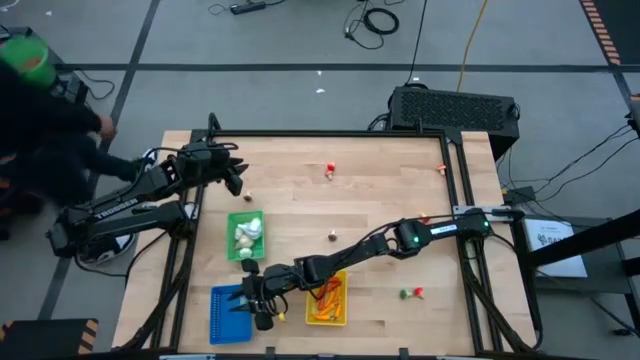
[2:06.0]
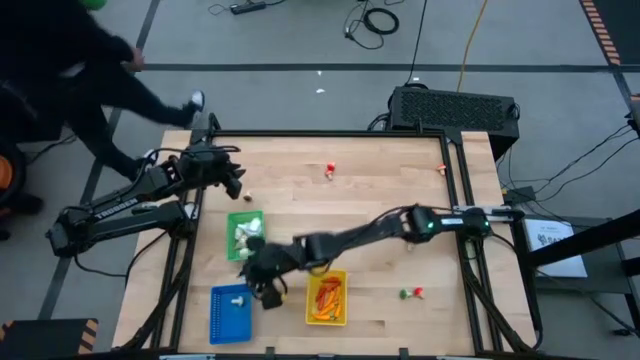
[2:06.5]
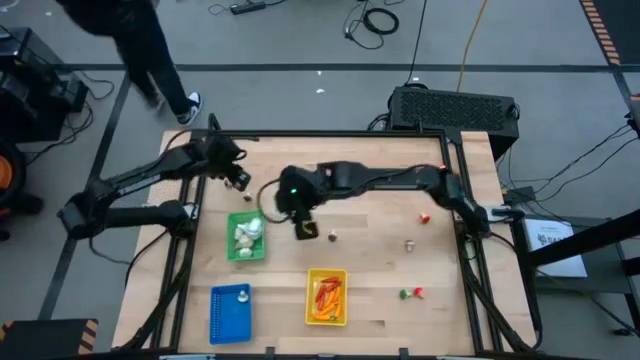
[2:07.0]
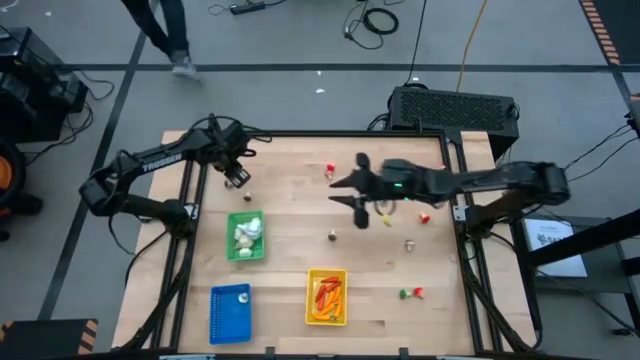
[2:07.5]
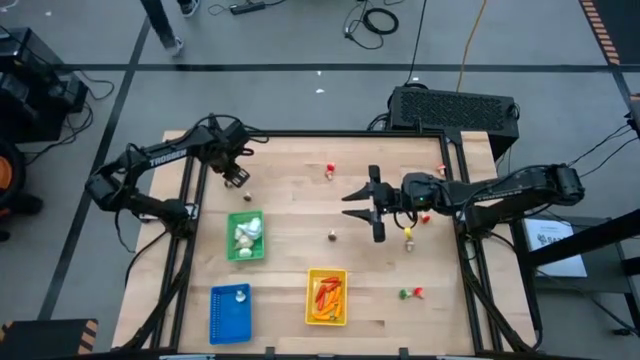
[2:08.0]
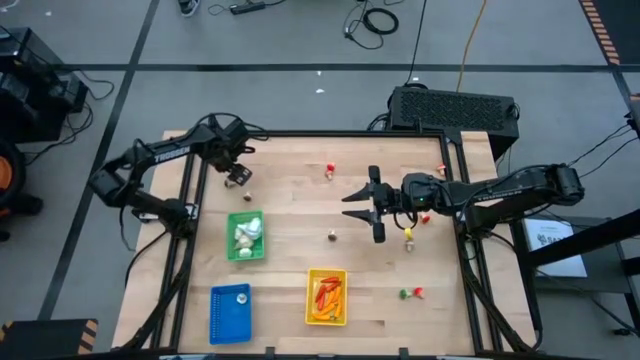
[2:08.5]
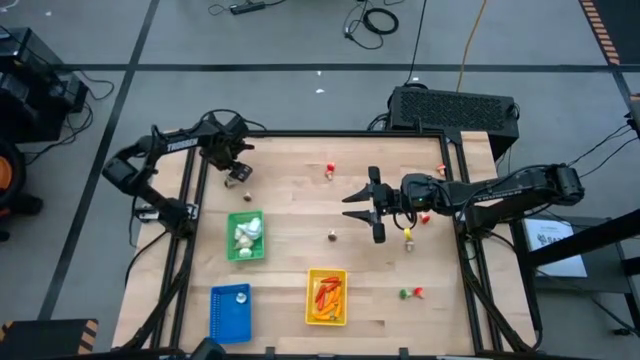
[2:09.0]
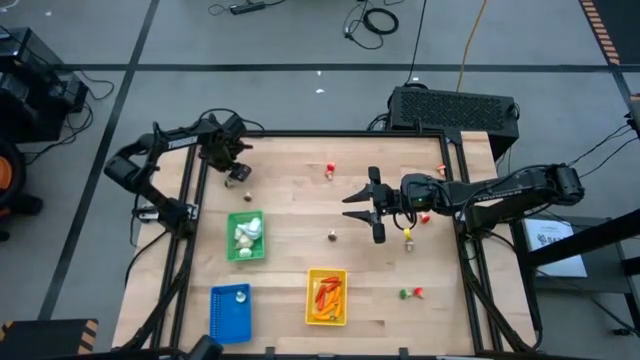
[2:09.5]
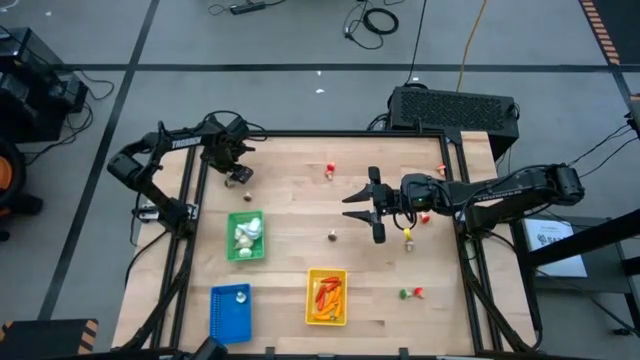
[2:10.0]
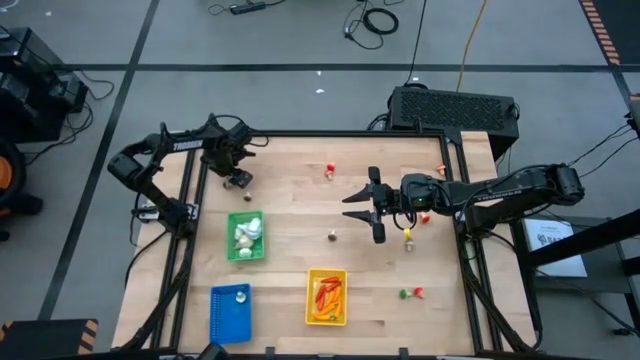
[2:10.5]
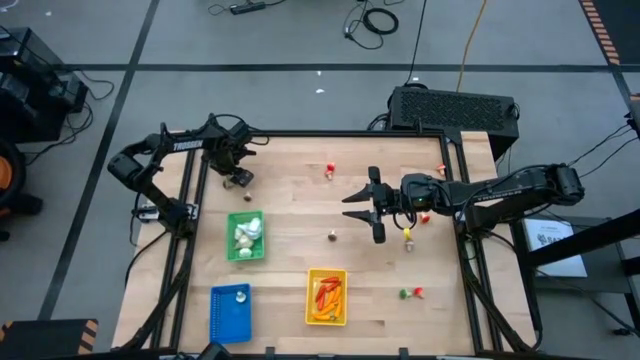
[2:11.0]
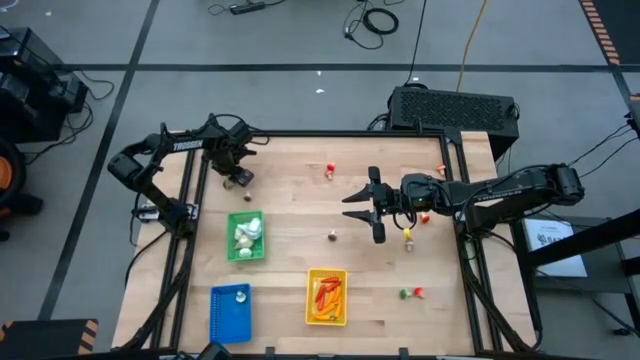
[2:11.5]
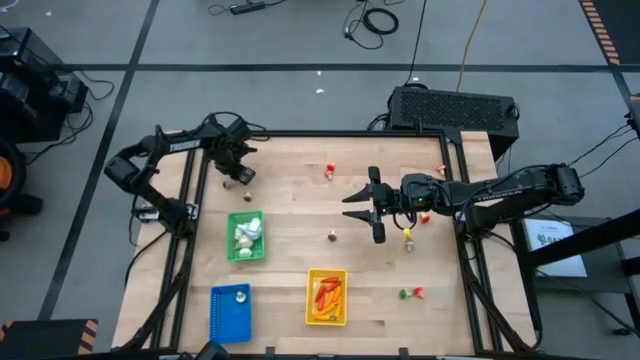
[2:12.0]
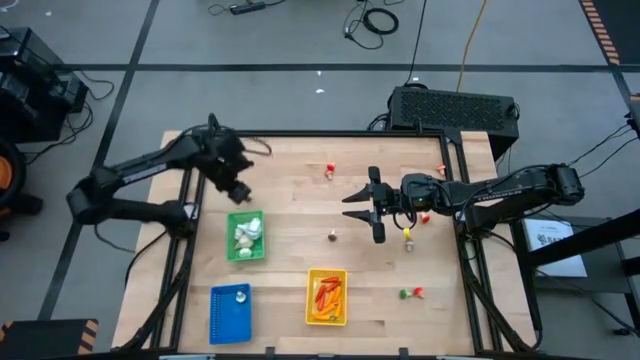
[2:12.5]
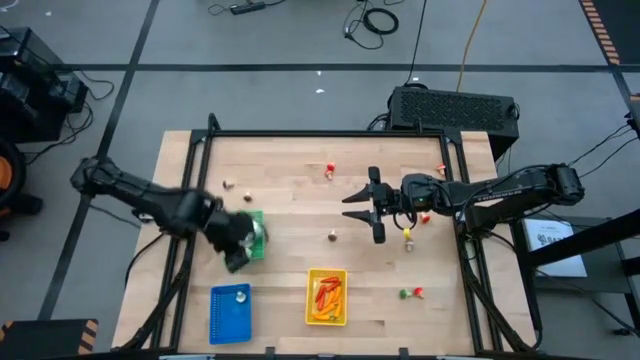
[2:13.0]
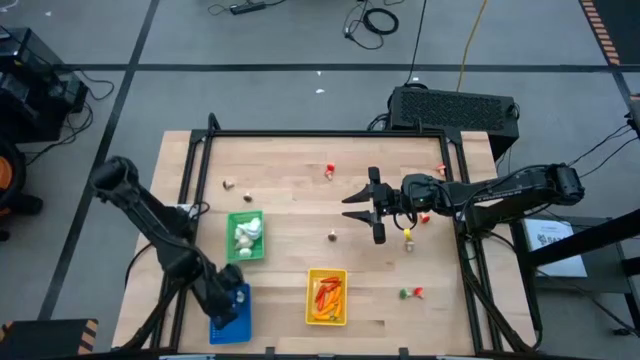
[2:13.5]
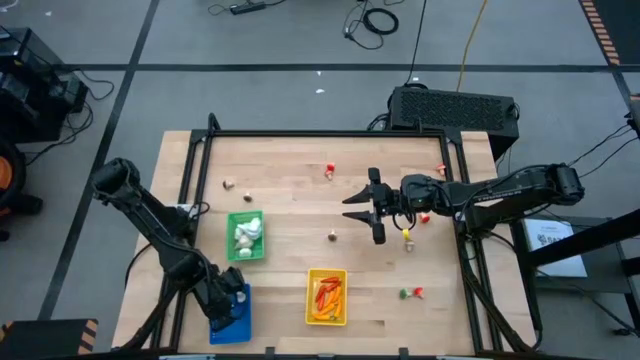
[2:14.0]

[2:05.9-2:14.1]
Task: Sort produce into baskets
Put the green mushroom into the blue basket

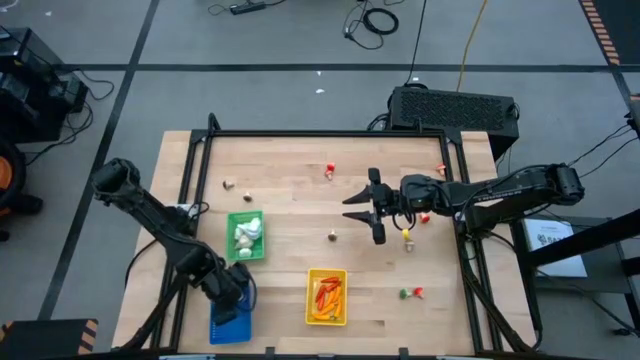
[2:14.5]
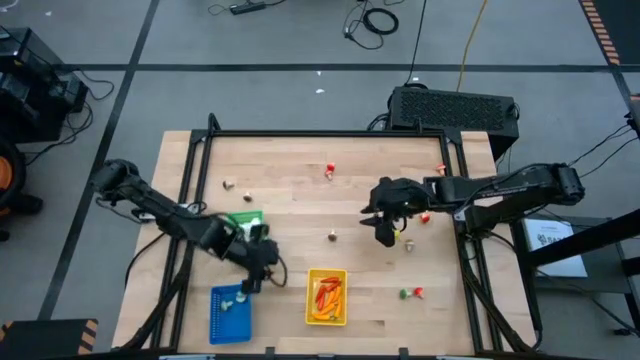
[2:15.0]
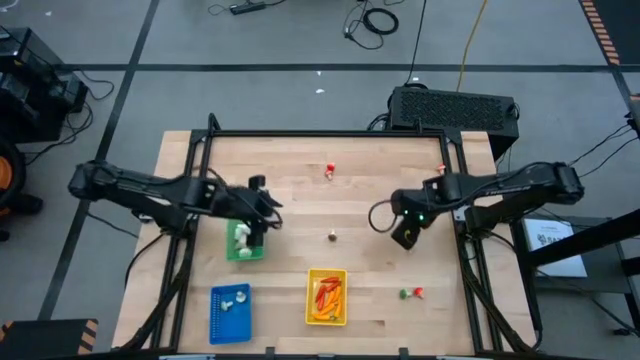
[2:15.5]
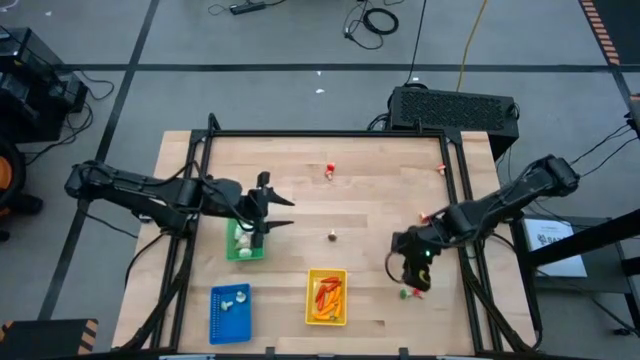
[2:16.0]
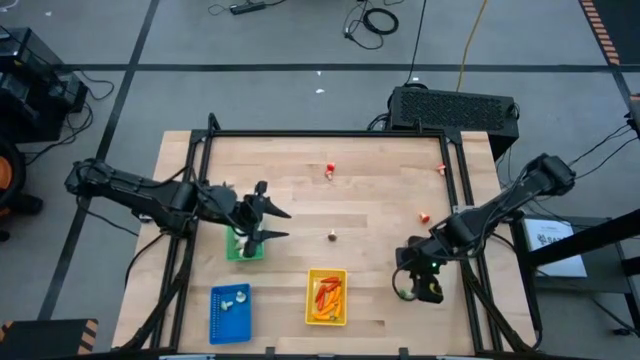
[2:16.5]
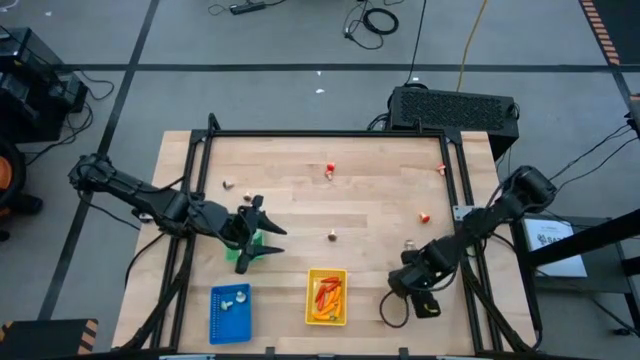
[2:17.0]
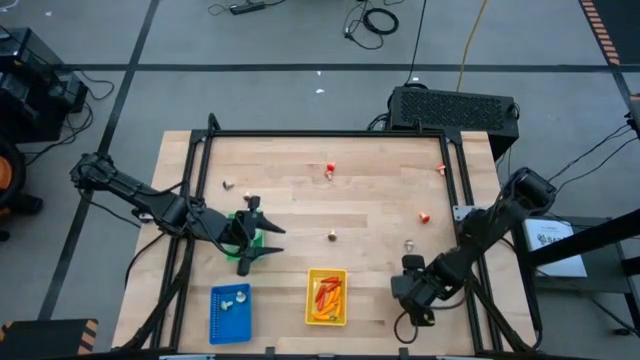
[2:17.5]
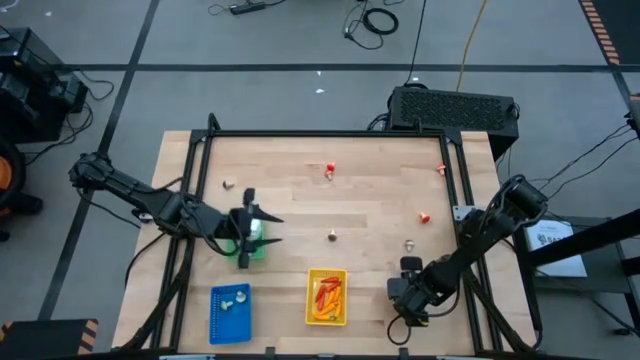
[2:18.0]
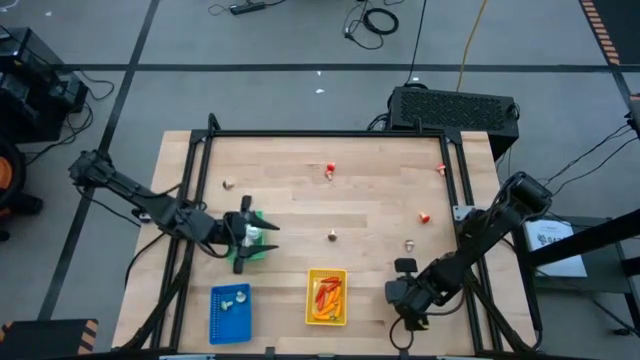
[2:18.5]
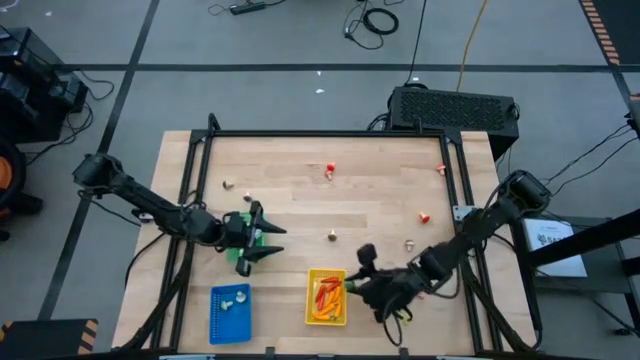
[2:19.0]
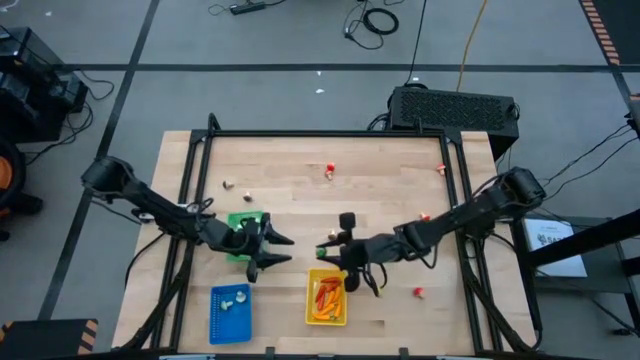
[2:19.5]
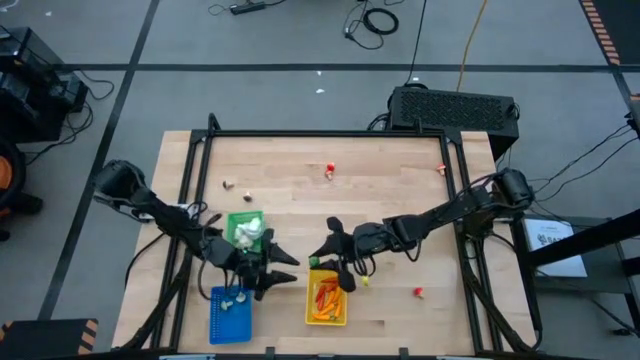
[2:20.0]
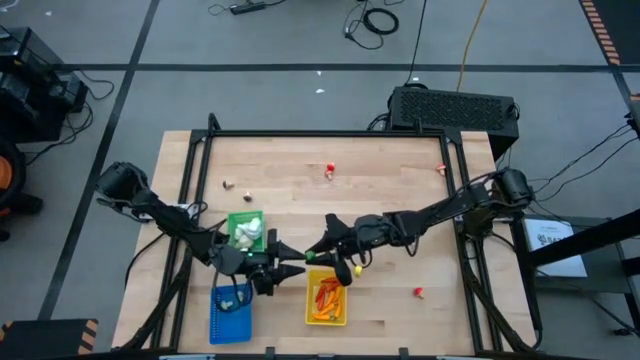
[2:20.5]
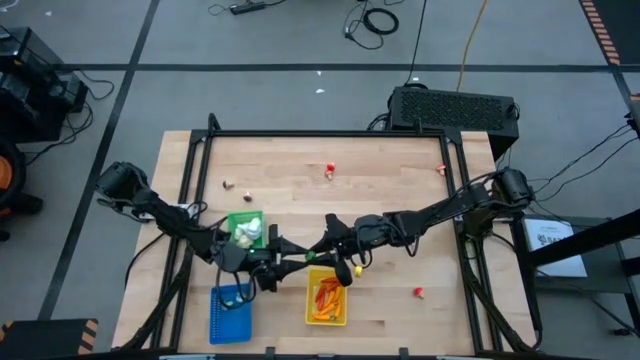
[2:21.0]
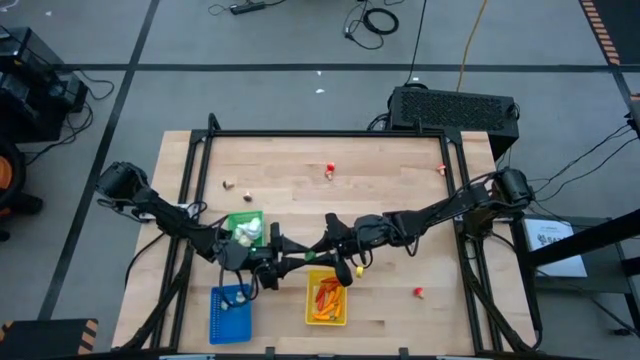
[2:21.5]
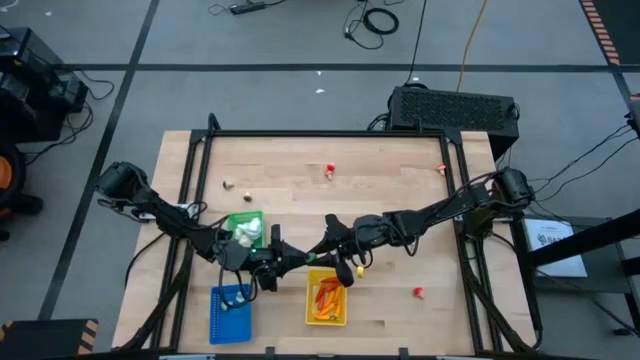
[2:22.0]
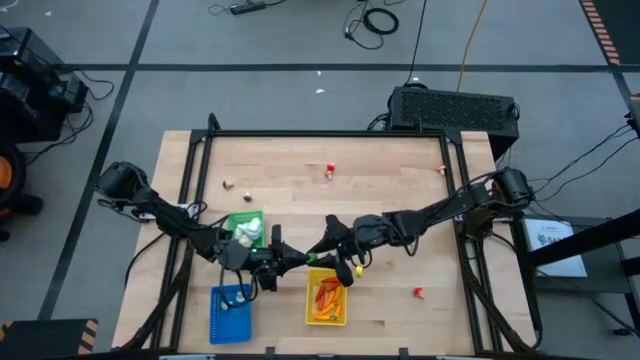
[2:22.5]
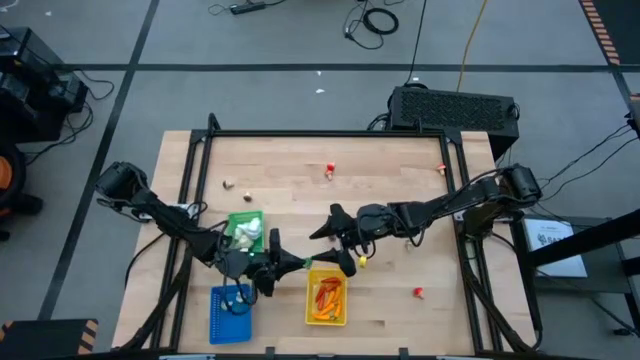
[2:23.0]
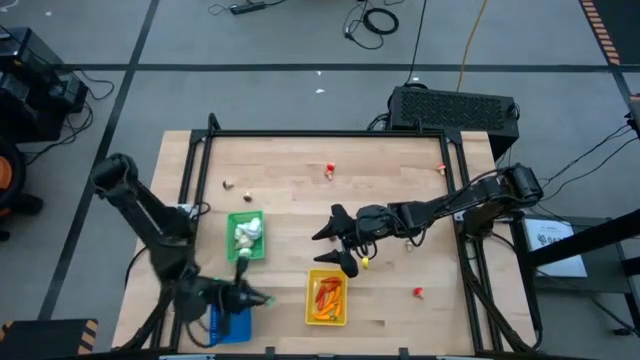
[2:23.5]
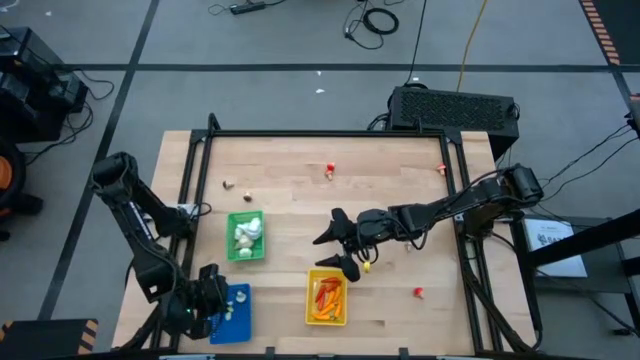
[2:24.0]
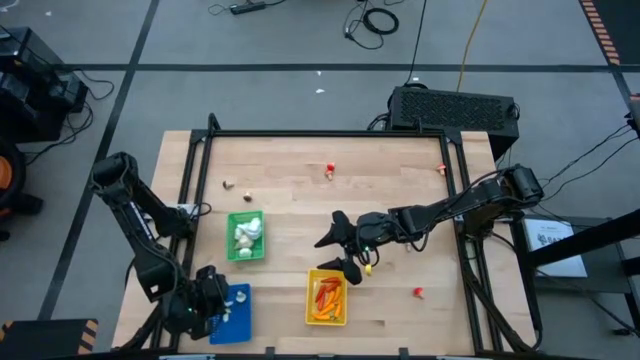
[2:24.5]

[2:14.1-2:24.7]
Put the green mushroom into the blue basket

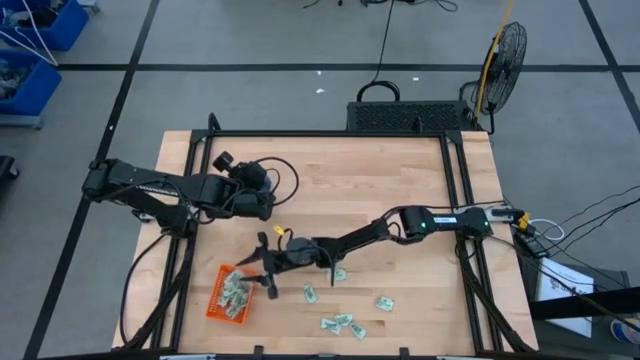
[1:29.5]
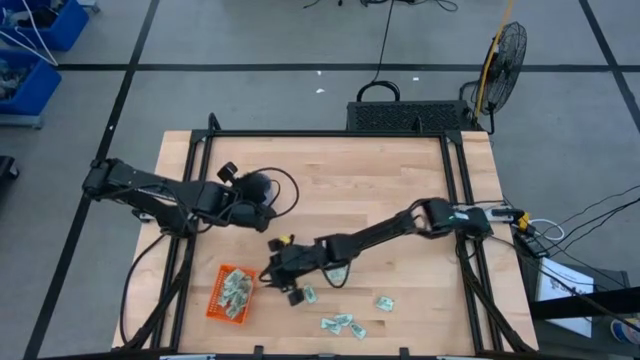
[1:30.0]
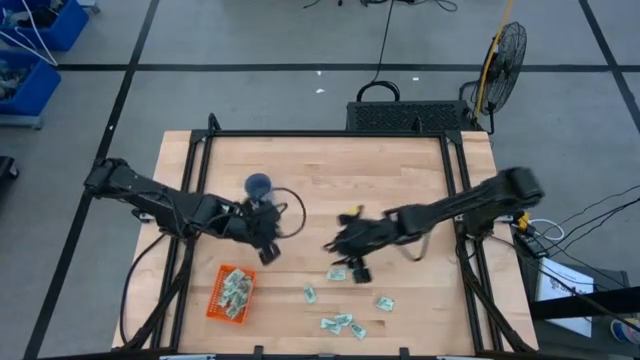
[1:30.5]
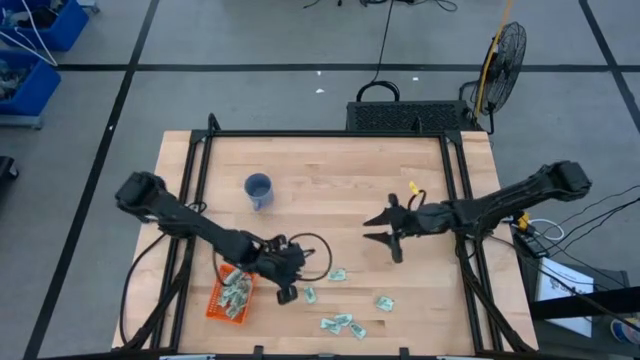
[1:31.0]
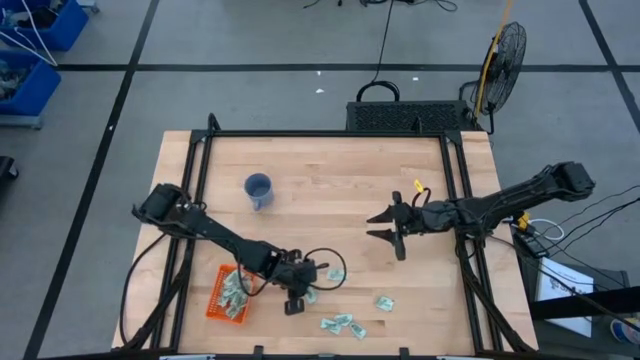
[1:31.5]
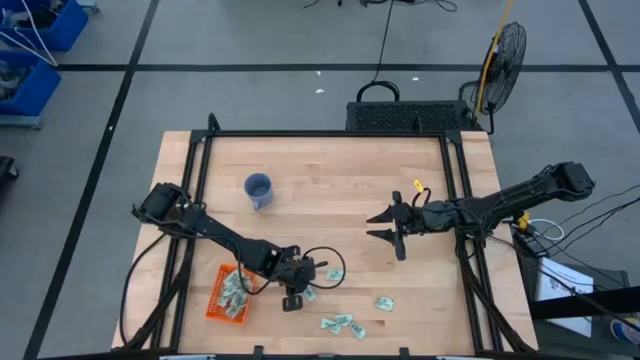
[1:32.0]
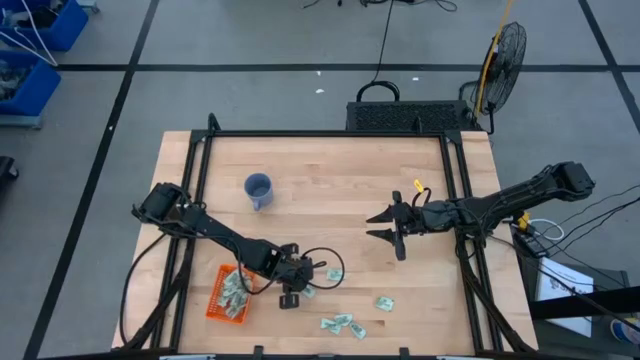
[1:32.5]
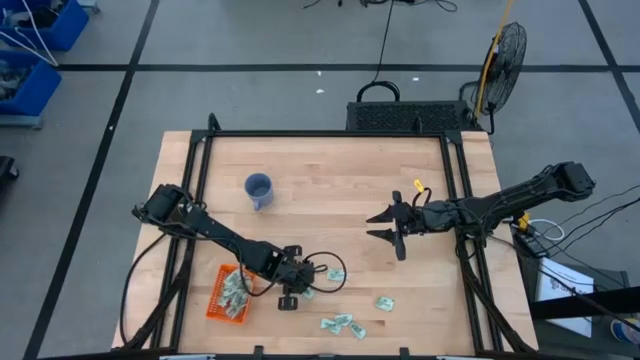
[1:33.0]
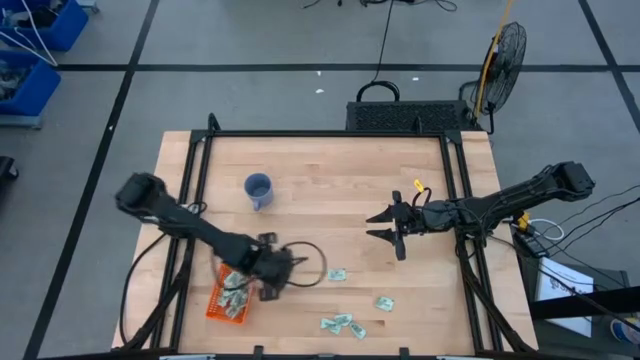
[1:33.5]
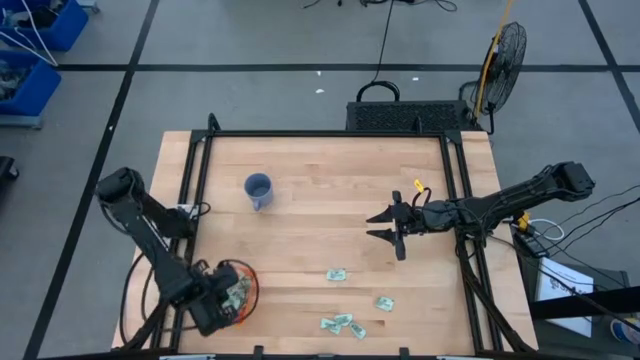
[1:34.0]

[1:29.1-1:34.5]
Task: Pick and place Stevia / Truvia into bins
Put the stevia packet into the orange bin
